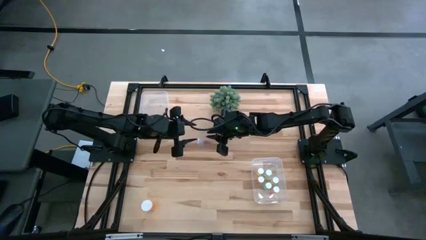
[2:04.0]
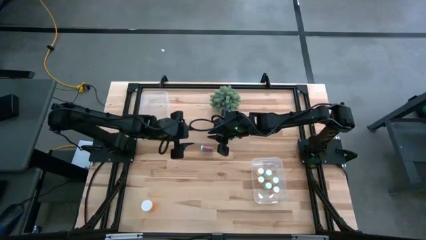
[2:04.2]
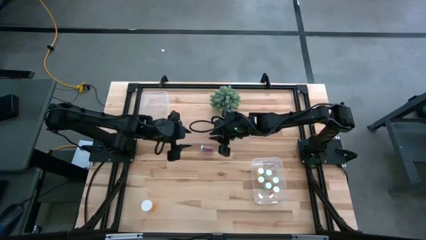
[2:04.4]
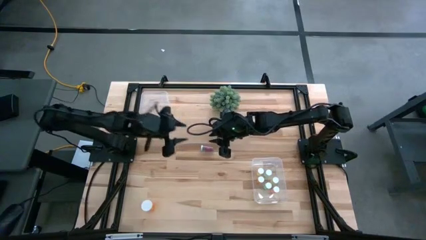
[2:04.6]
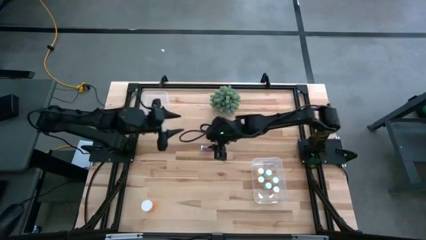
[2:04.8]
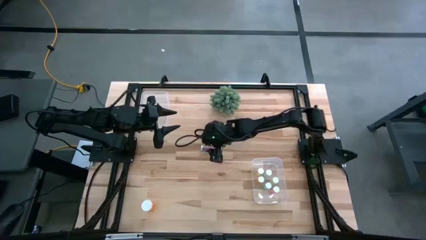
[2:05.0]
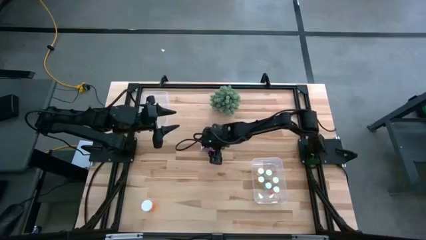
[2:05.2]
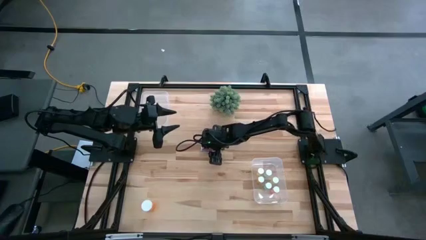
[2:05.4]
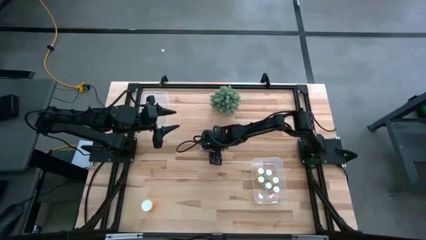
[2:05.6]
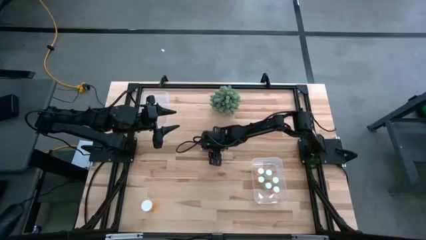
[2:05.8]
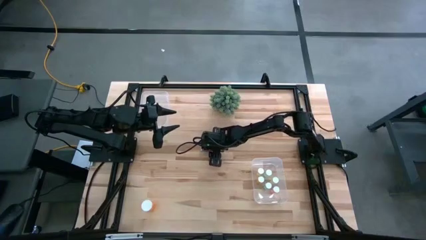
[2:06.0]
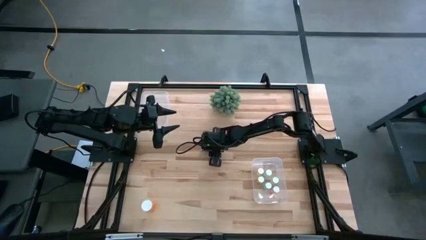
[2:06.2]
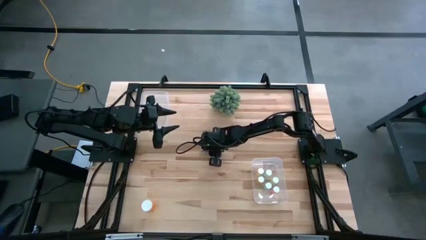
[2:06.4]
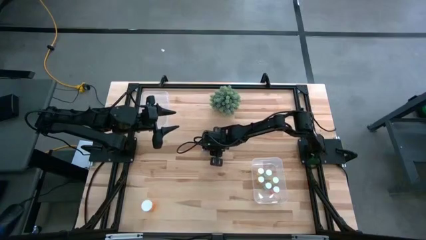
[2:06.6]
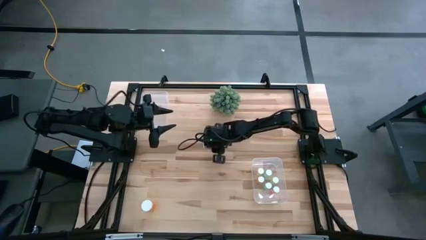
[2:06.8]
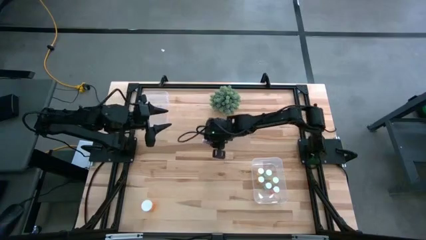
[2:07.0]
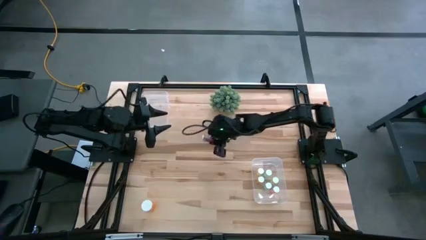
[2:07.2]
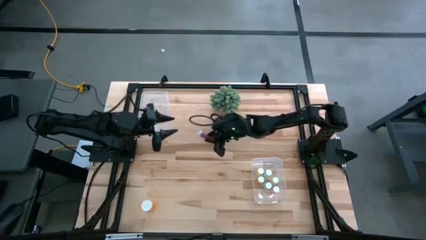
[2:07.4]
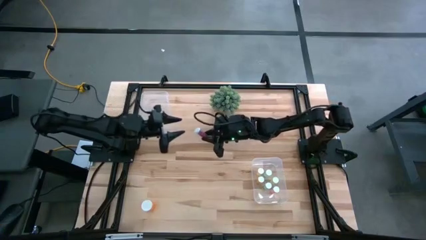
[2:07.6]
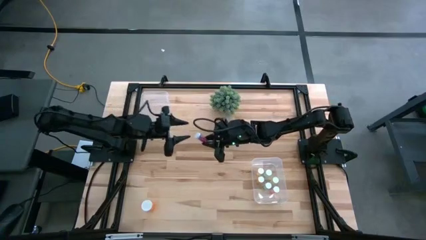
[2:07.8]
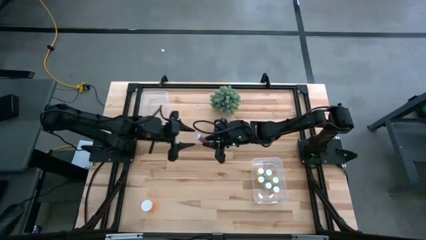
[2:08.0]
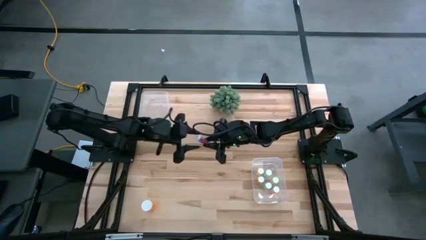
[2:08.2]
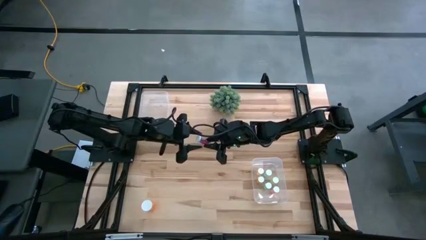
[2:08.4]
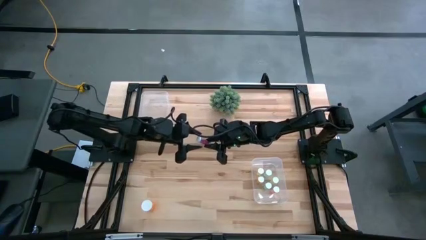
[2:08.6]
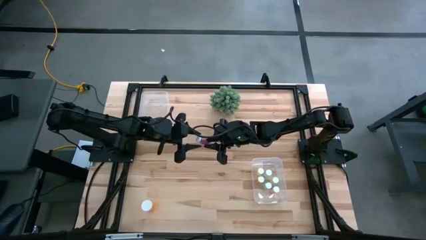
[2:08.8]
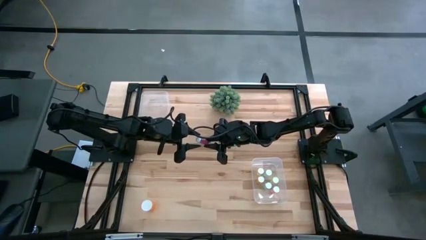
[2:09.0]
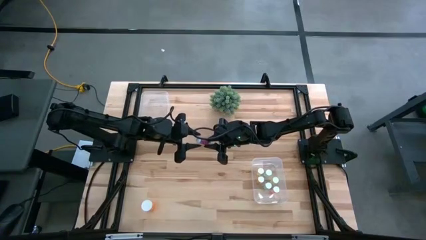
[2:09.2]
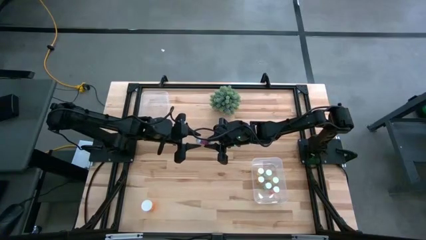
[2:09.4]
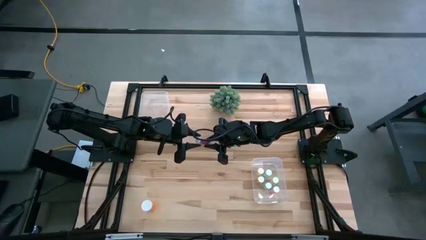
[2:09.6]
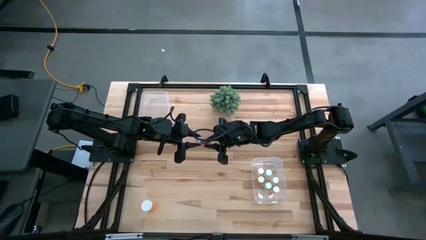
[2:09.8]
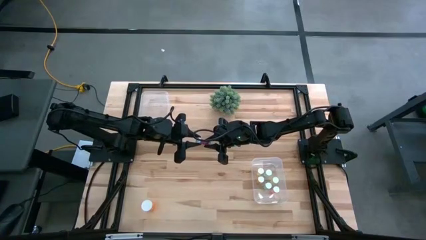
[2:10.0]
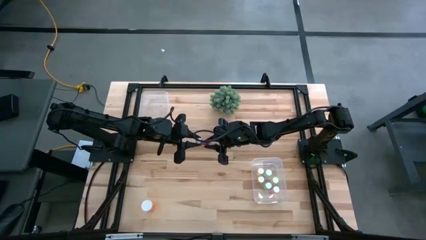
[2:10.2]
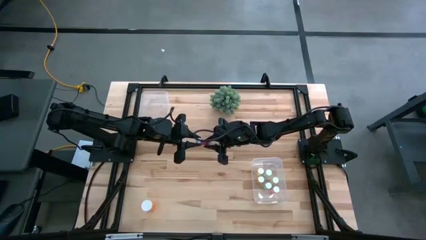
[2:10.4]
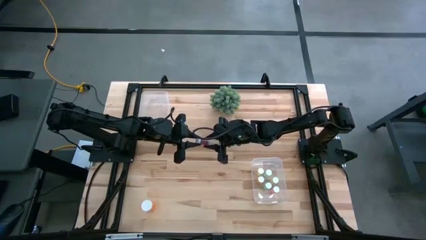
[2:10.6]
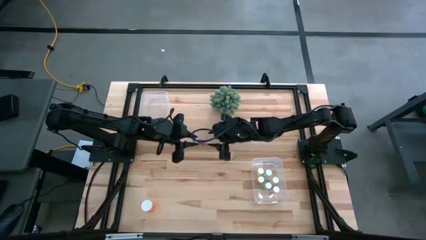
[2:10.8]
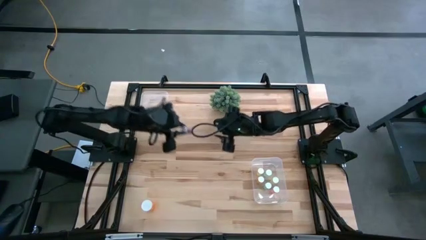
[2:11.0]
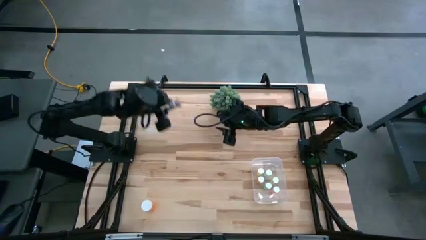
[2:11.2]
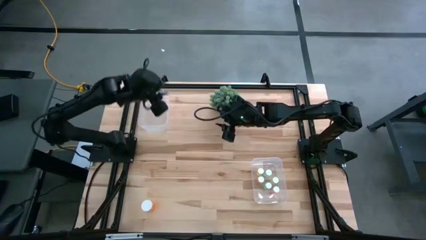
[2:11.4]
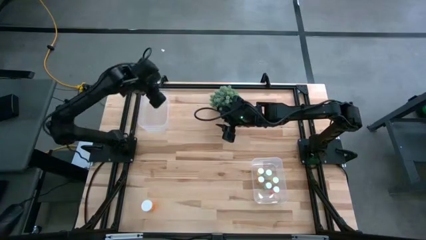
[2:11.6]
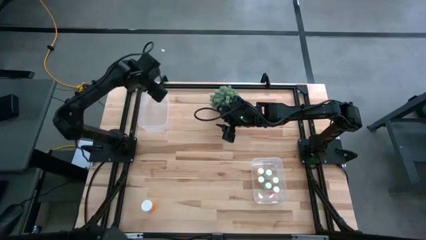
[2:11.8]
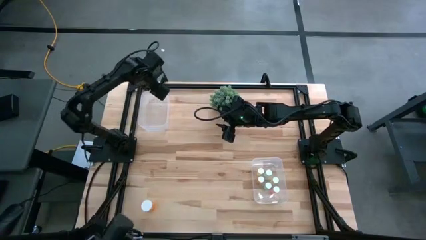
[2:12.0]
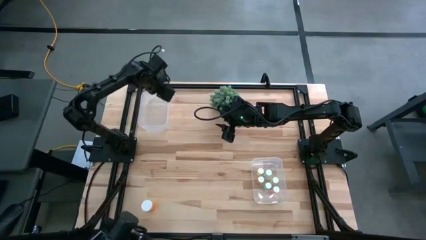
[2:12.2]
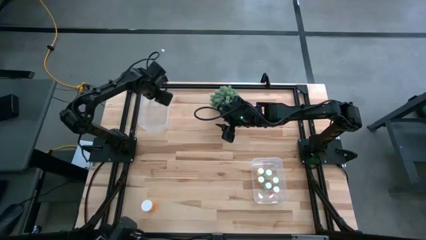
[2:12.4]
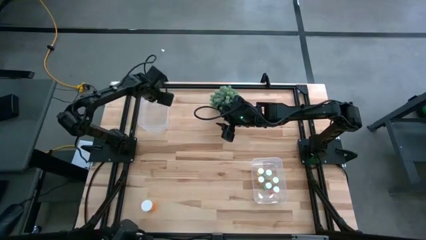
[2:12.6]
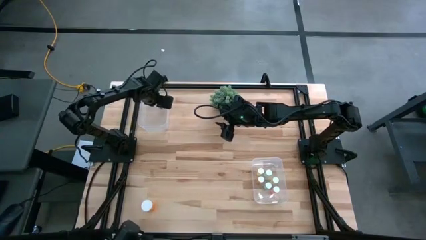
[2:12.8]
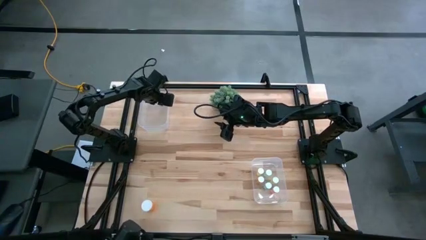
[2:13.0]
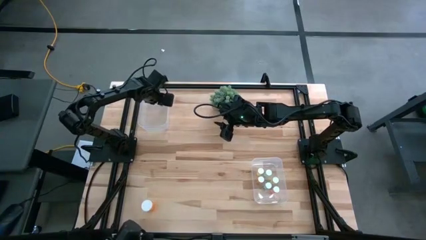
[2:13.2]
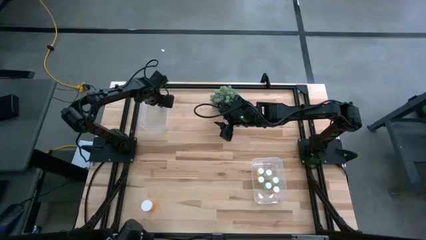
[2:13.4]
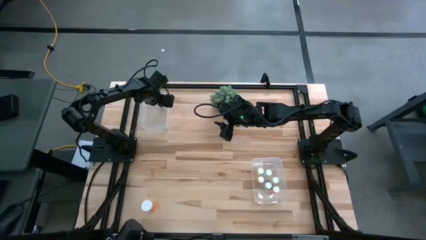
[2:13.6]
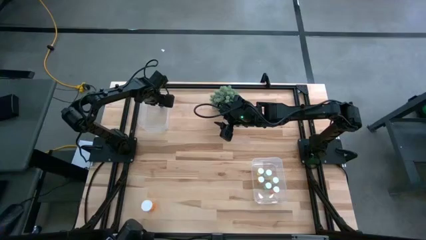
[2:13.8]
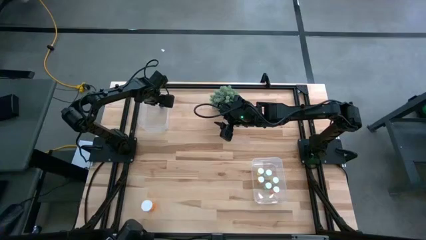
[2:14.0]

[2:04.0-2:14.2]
Task: Pick and place medicine bottles into bin by pill shape (circle, oval)
Put the blue capsule bottle into the left transparent bin

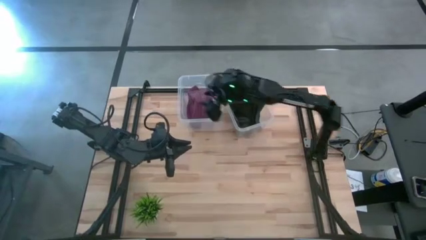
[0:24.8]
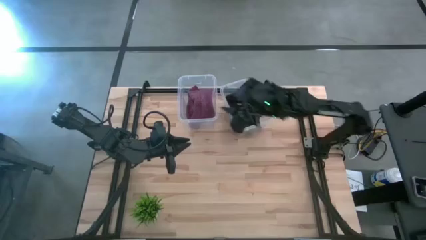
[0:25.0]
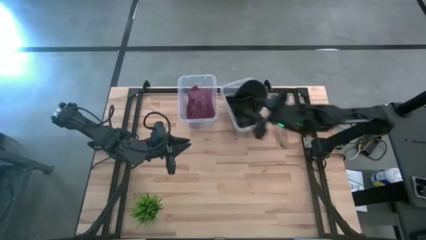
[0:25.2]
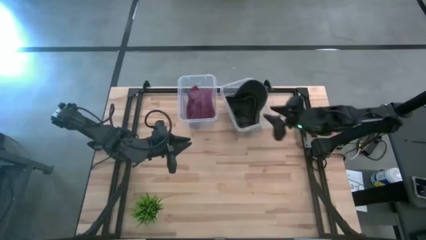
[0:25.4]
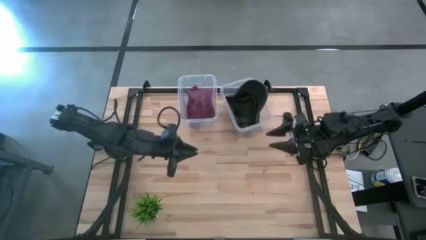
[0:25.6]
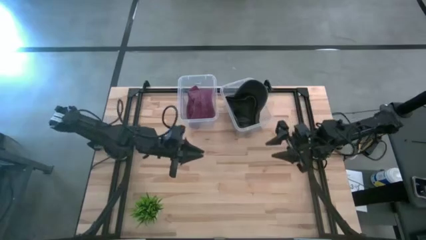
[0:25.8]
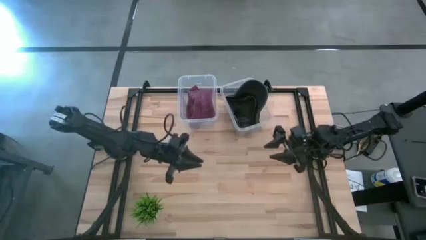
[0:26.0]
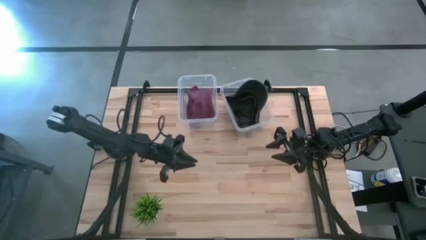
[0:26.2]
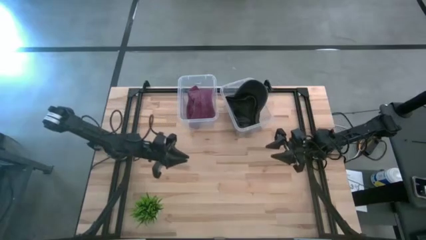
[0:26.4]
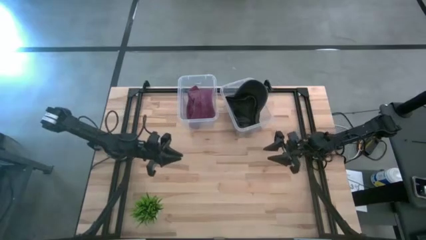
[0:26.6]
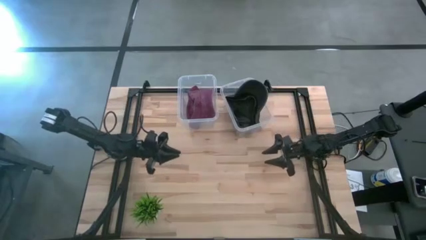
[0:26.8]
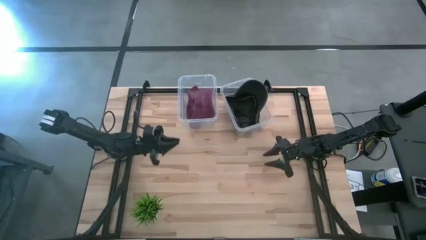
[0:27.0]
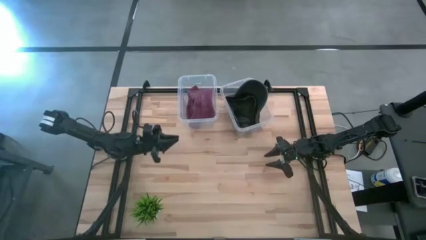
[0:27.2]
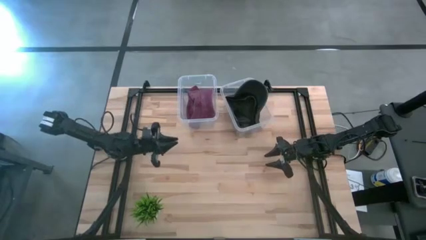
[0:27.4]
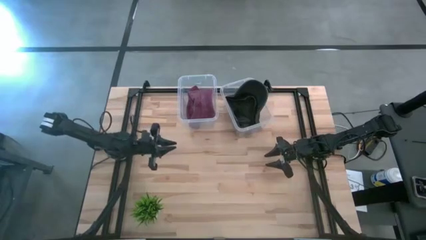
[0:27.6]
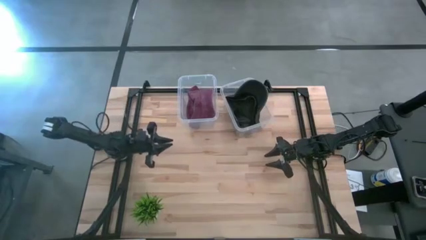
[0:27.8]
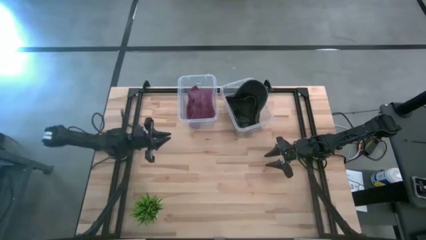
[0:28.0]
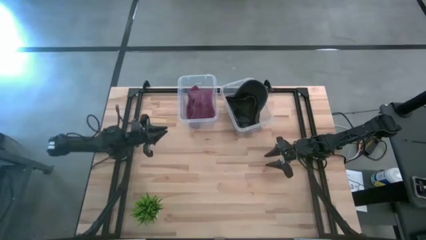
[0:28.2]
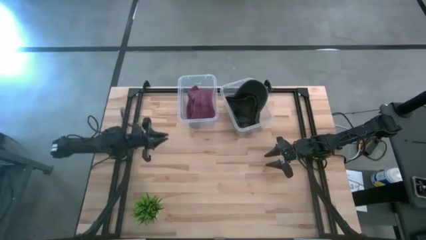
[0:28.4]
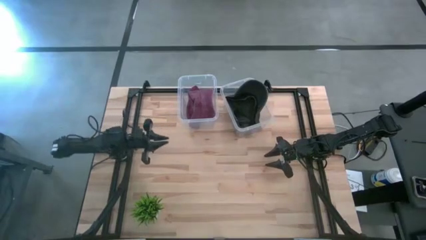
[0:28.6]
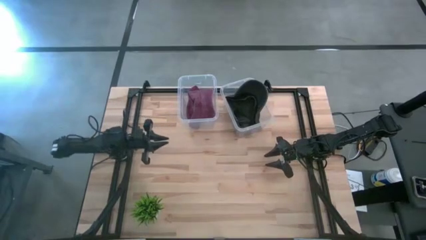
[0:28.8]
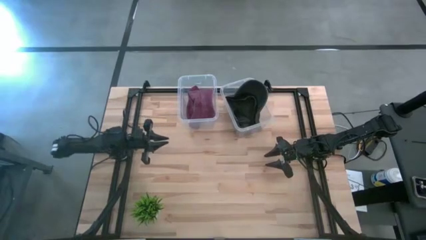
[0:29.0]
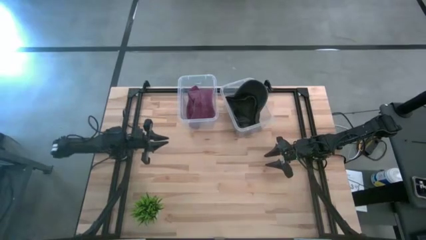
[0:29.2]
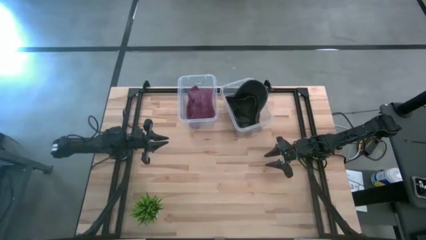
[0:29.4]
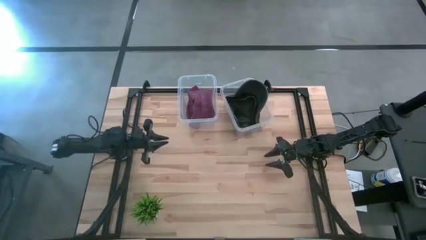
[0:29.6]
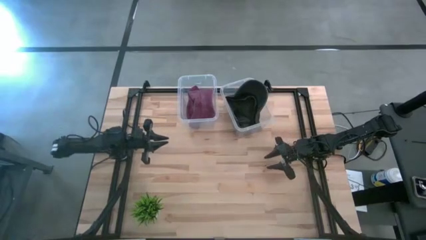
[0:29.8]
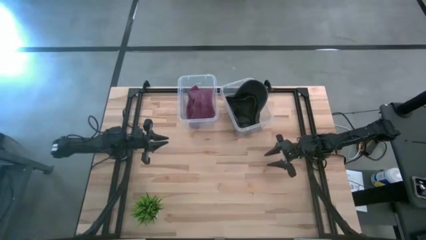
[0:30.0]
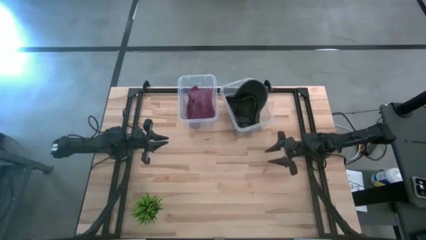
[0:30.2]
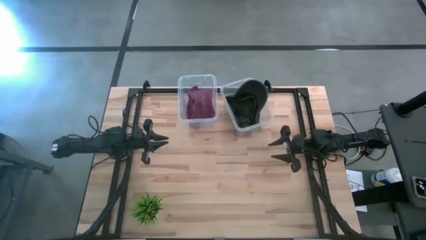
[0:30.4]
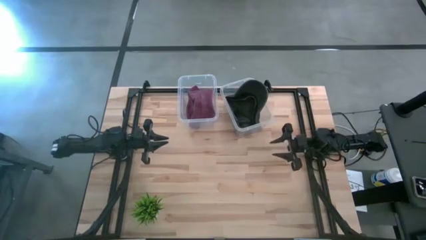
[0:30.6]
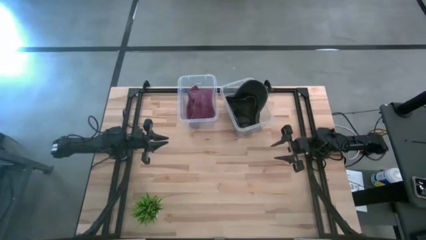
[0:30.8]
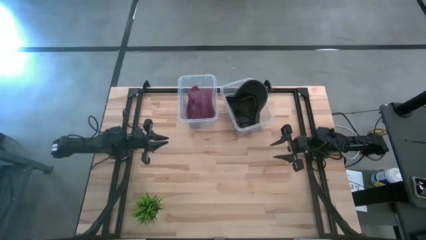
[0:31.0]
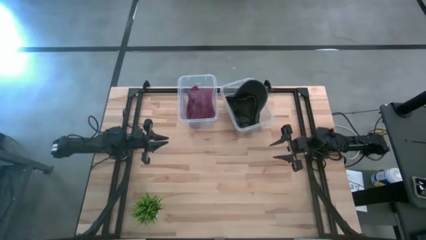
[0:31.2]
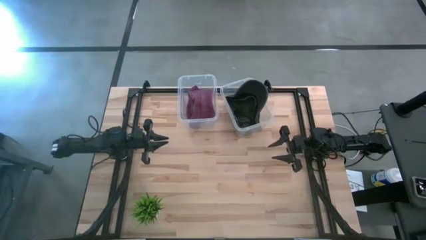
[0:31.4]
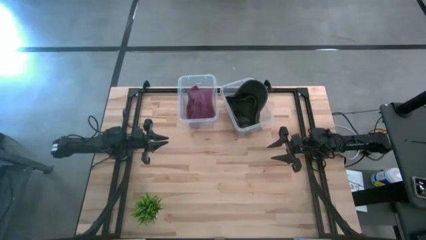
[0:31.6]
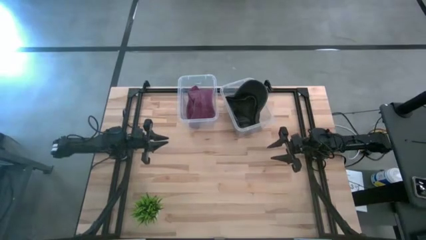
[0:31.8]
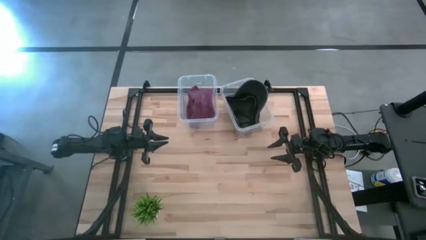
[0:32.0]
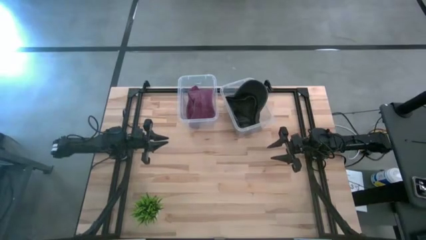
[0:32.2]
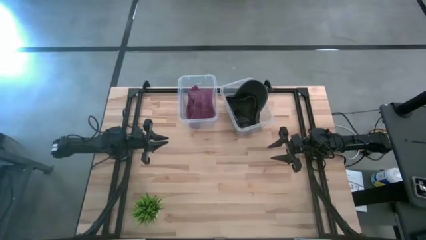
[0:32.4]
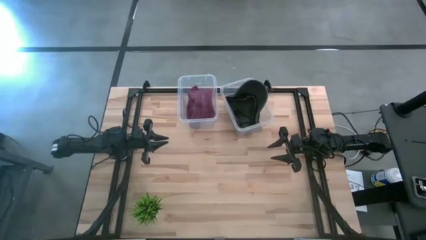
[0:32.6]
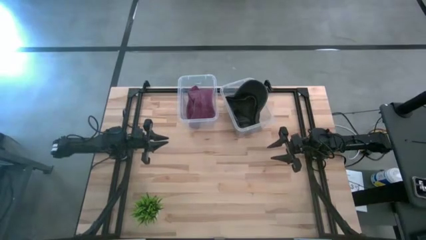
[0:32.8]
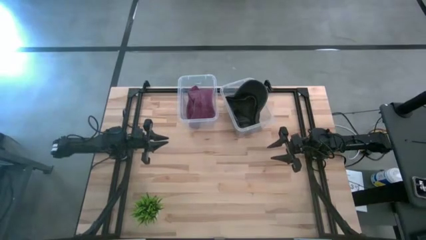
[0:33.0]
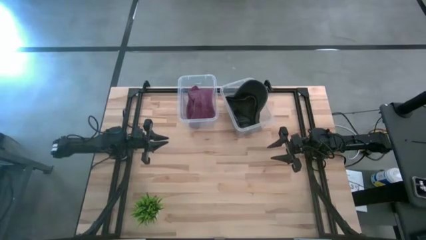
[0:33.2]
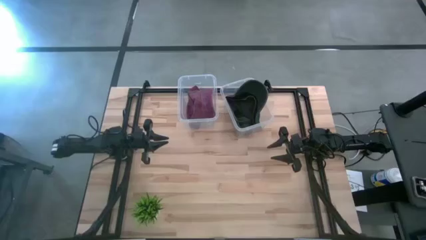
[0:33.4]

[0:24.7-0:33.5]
Task: Pick and place caps into container
Return to Home Position
